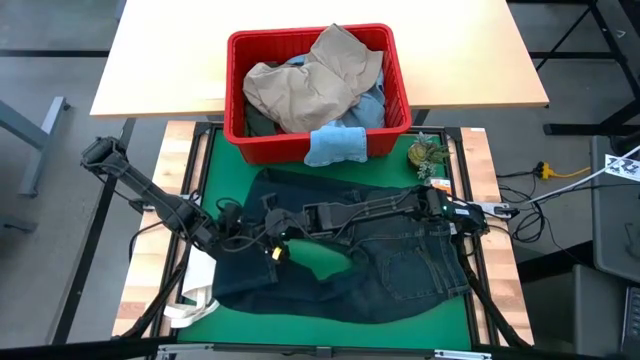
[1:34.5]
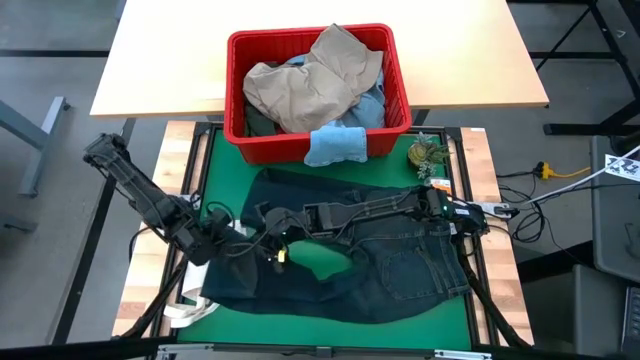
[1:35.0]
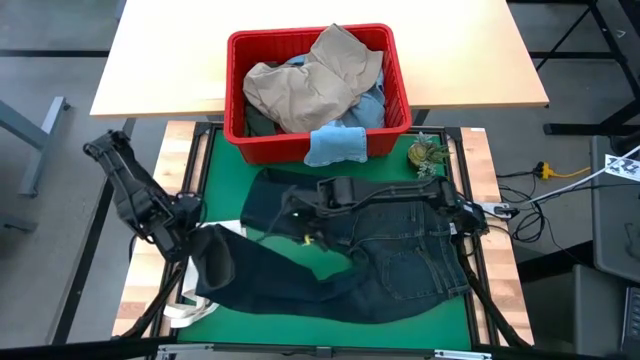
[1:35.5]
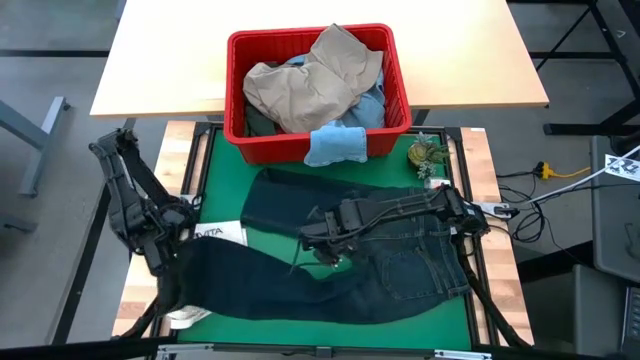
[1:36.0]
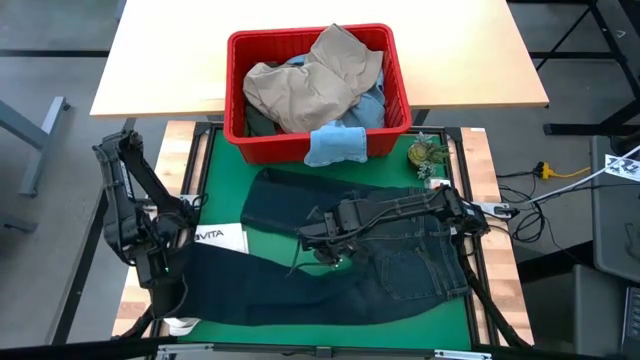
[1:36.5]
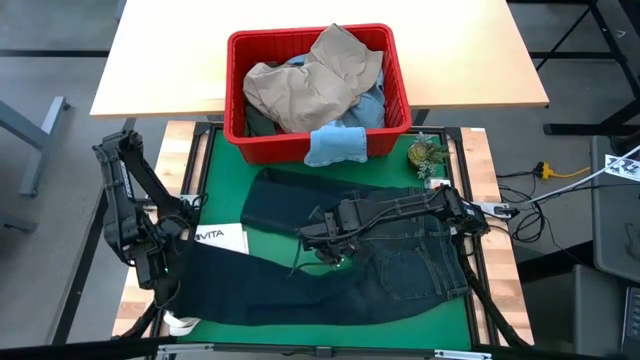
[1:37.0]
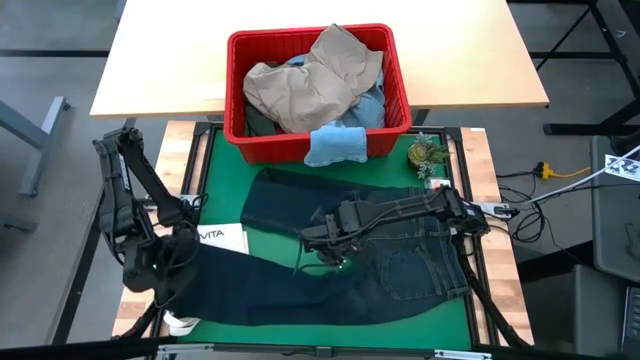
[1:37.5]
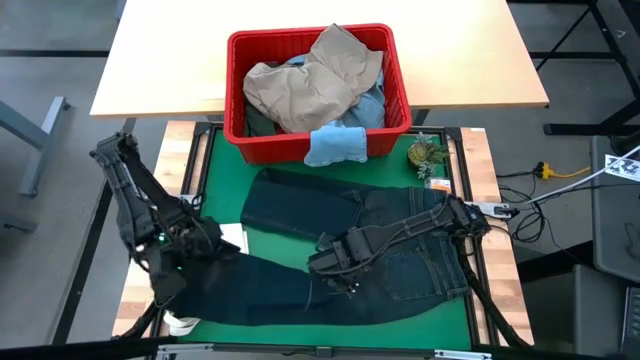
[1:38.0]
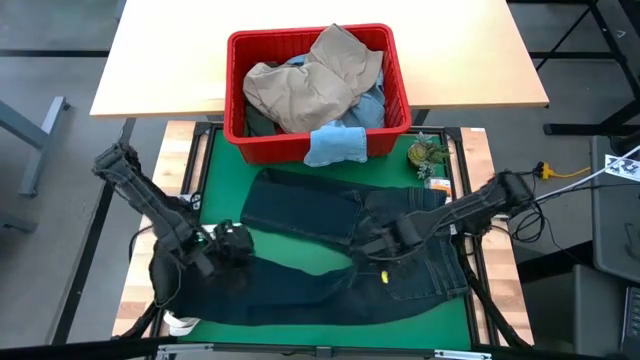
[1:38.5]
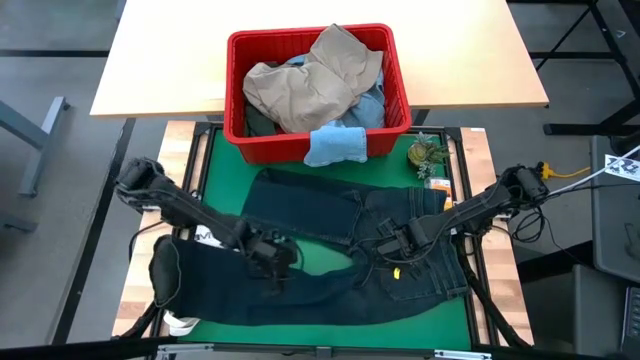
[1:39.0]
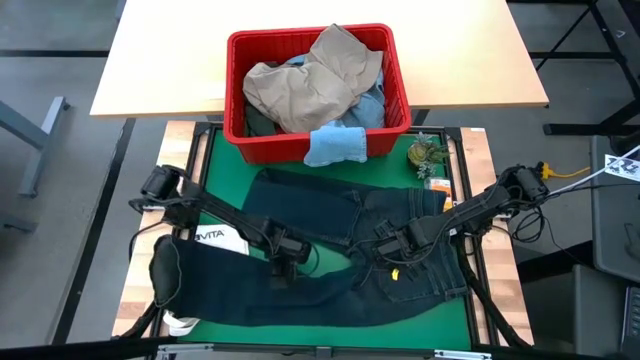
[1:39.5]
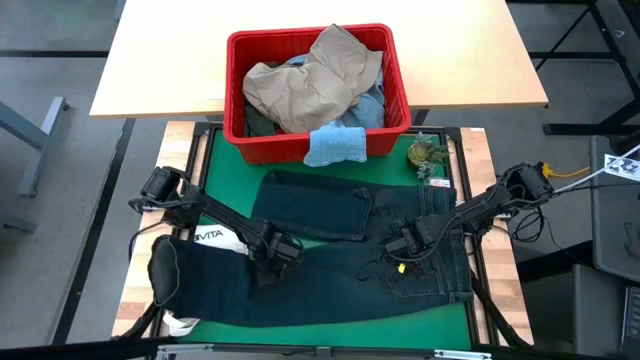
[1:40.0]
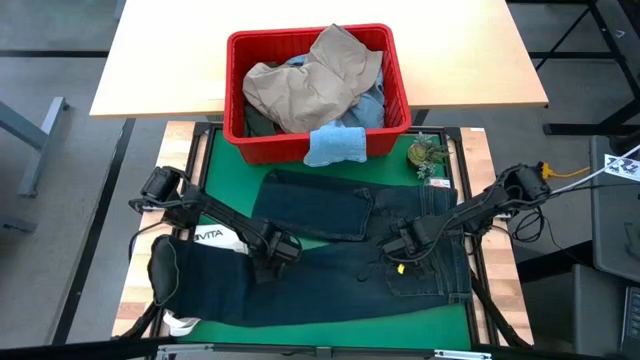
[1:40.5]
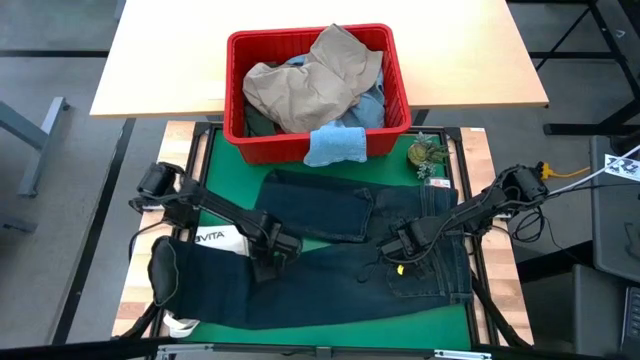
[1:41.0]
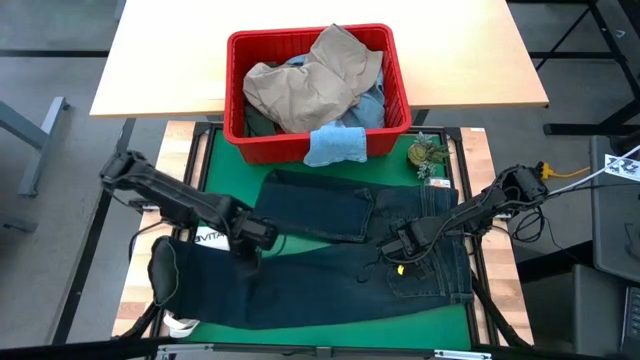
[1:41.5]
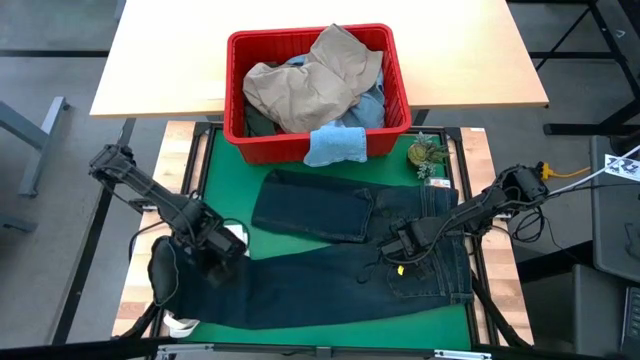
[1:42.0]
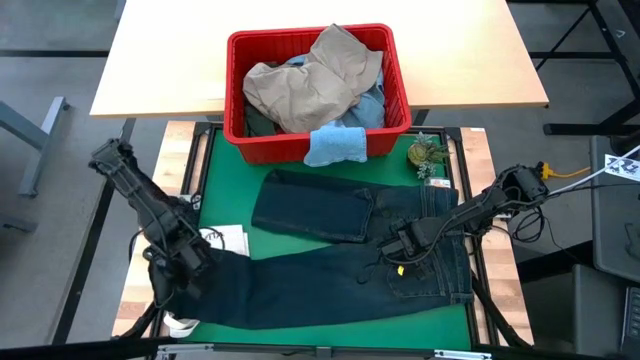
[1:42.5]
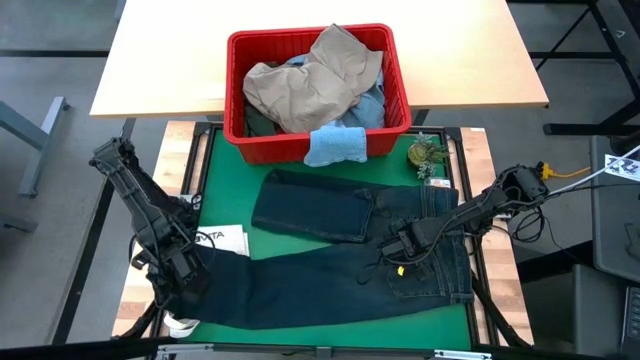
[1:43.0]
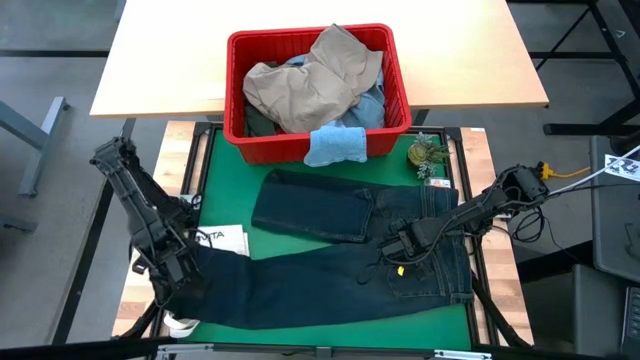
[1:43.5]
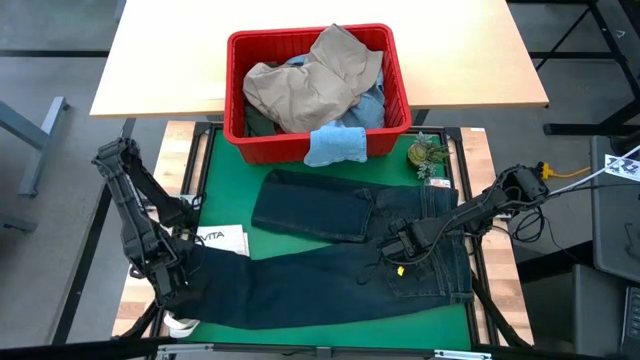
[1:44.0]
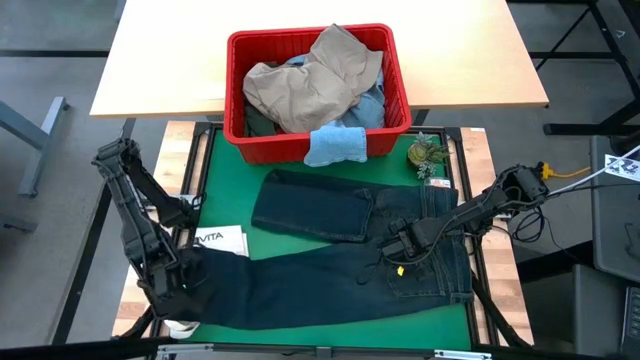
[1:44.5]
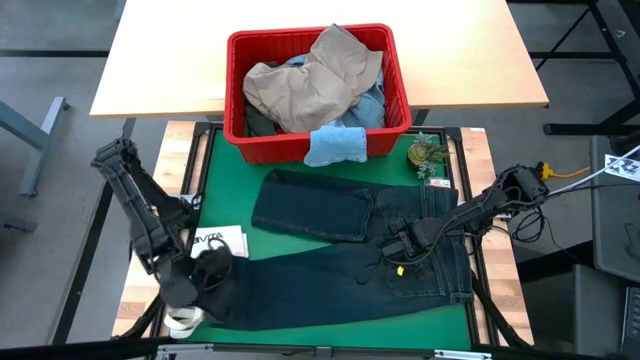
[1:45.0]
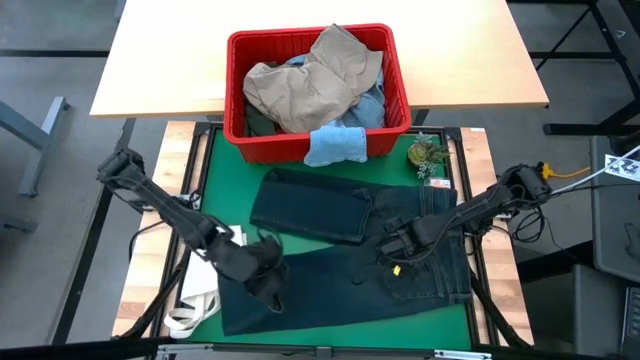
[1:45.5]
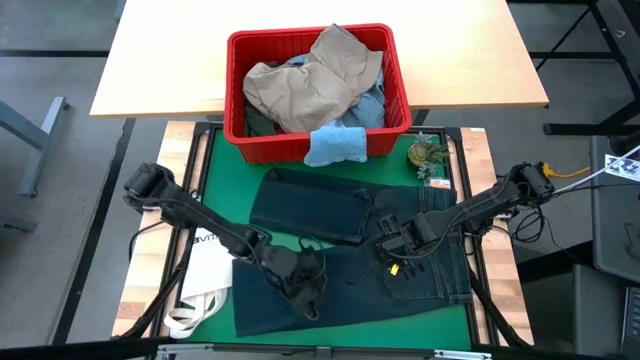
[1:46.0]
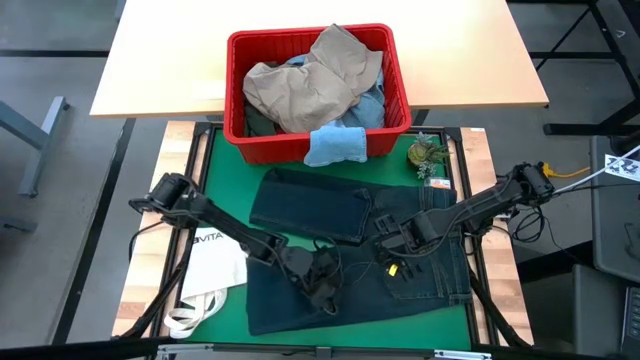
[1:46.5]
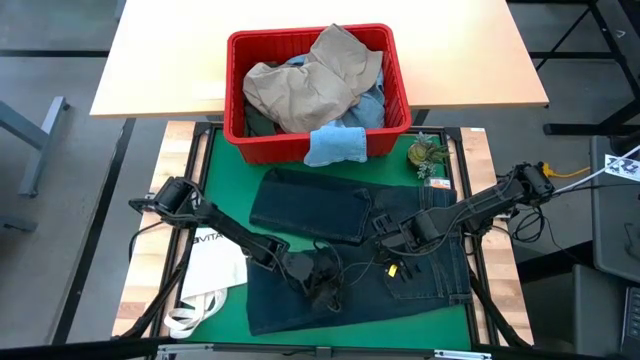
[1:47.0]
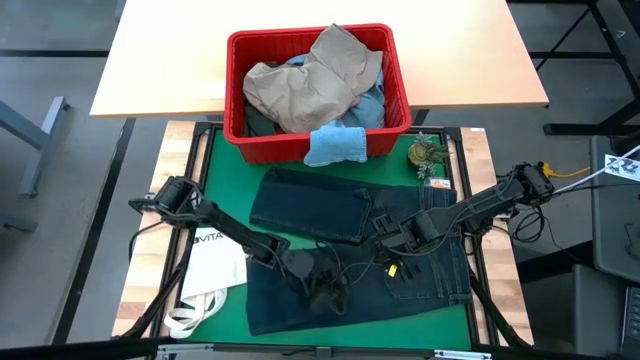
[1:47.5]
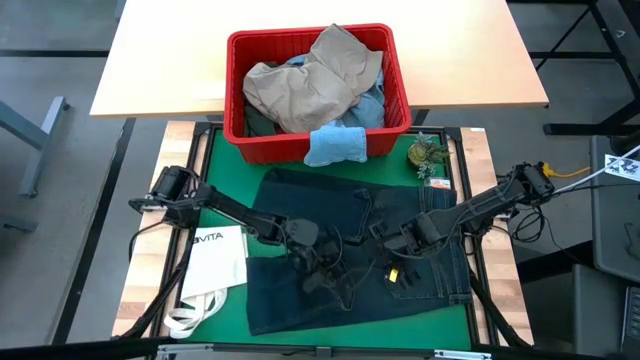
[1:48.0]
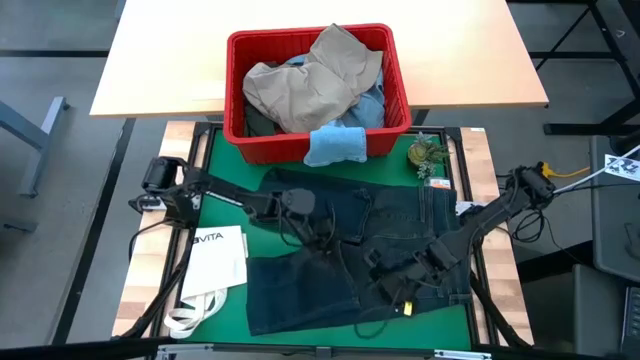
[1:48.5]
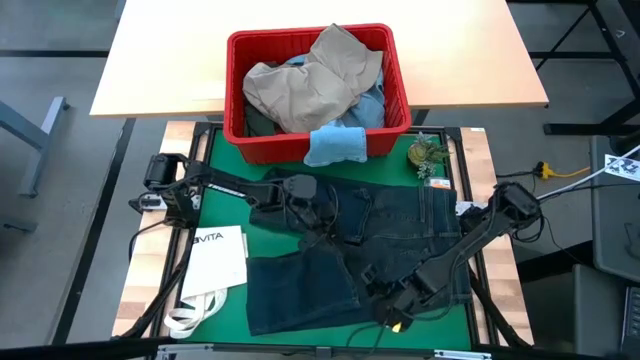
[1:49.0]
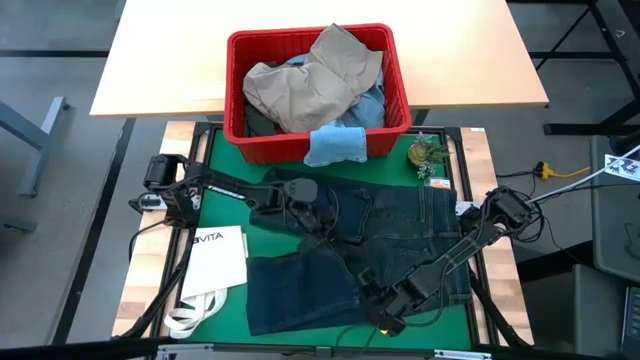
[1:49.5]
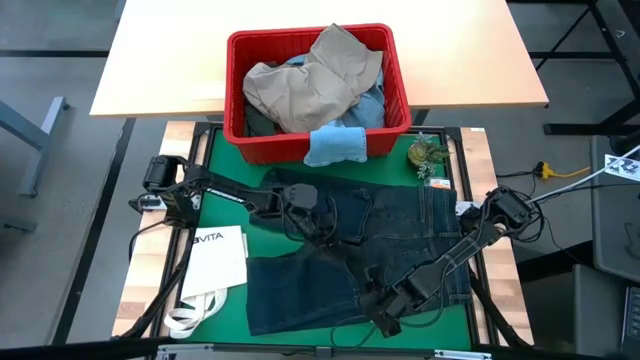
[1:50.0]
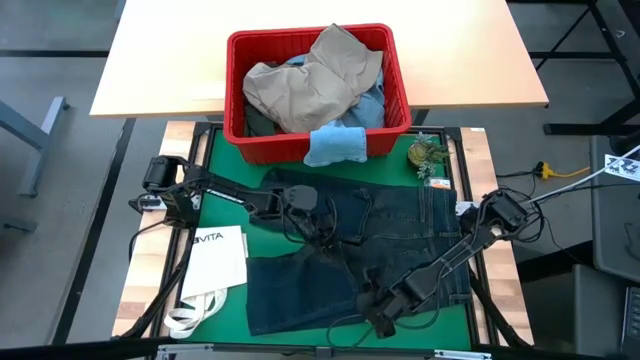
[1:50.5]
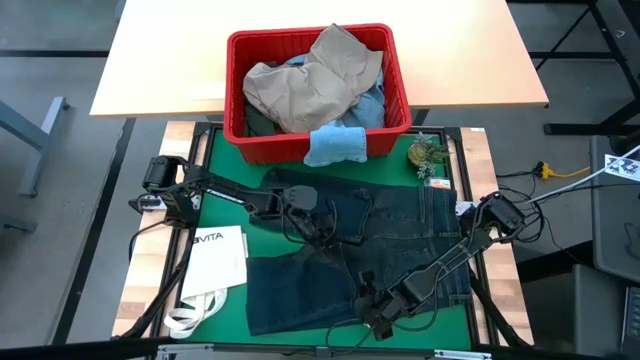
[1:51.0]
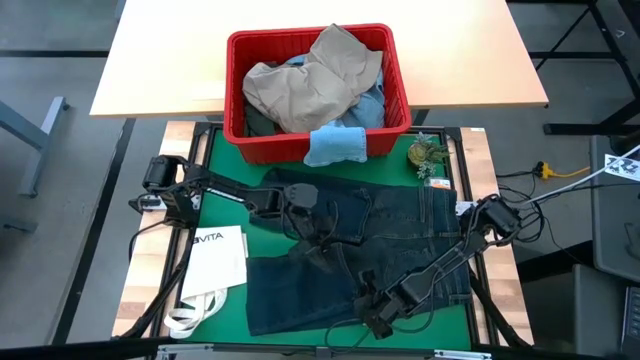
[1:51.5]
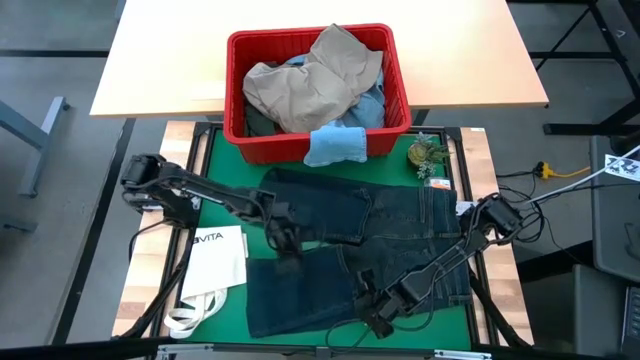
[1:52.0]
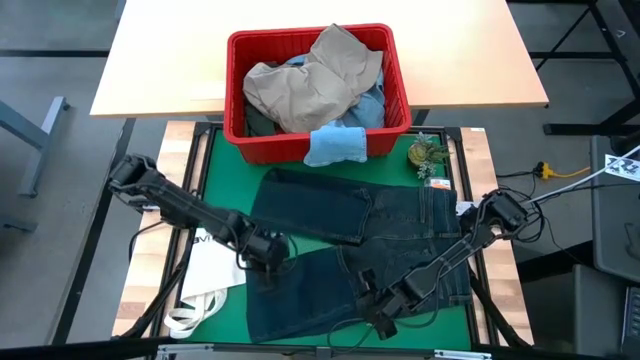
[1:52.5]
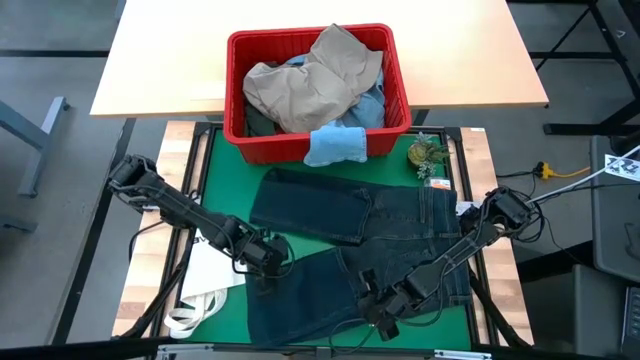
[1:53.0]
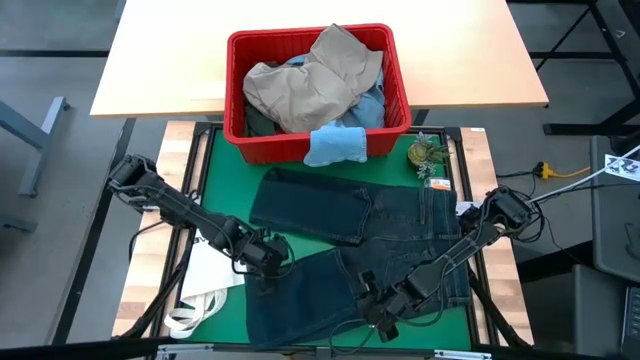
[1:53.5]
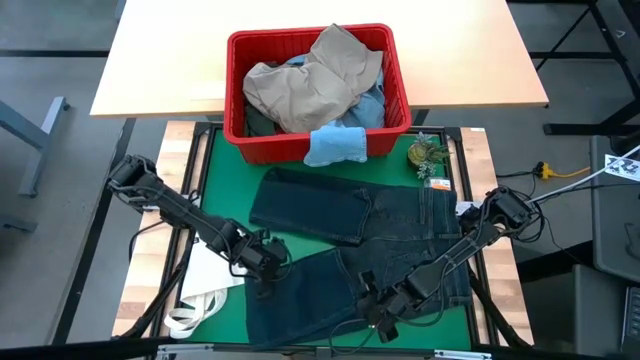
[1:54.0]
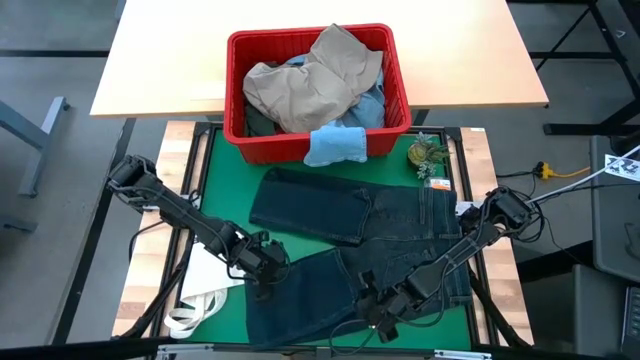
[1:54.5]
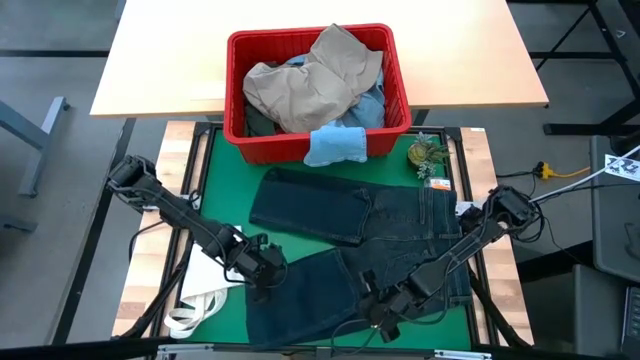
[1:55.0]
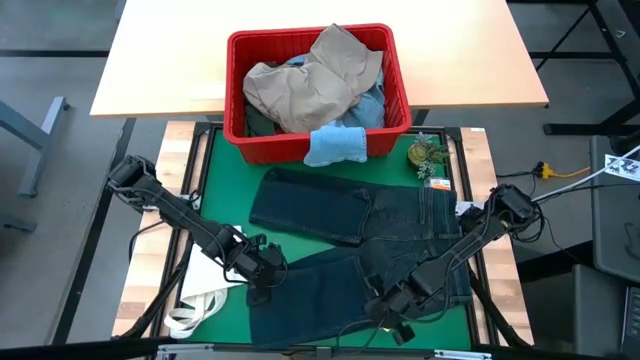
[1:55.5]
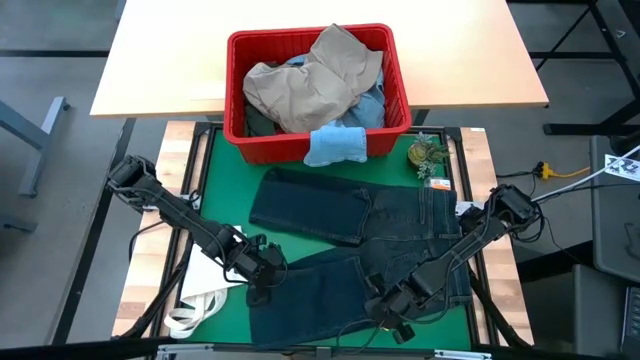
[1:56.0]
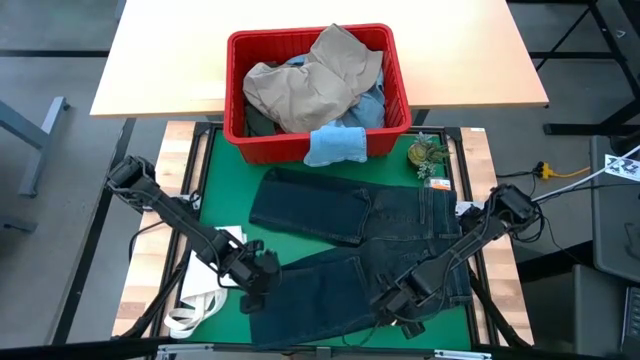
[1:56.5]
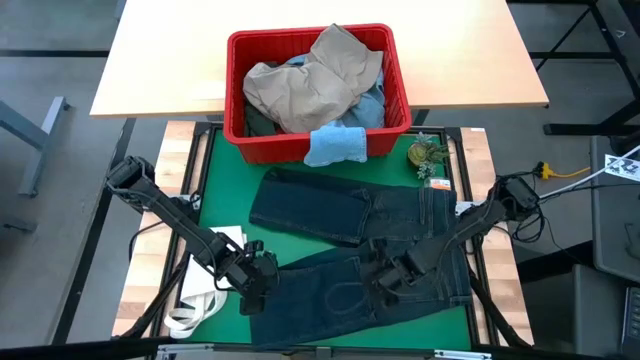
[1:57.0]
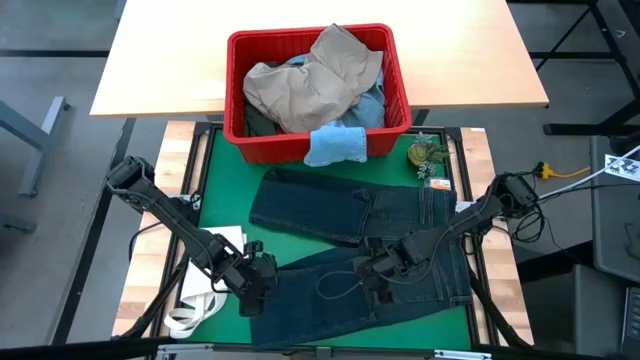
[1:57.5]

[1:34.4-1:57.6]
Task: Fold Laundry from Bin
Fold the dark blue pants
